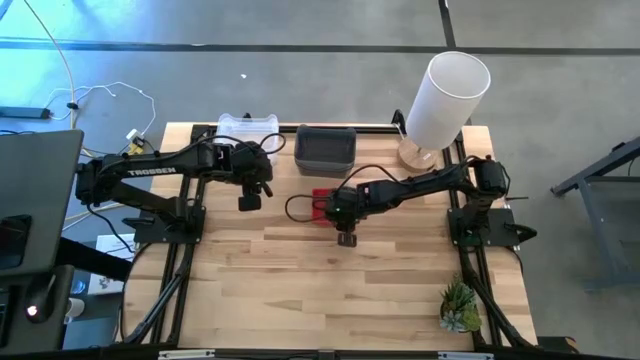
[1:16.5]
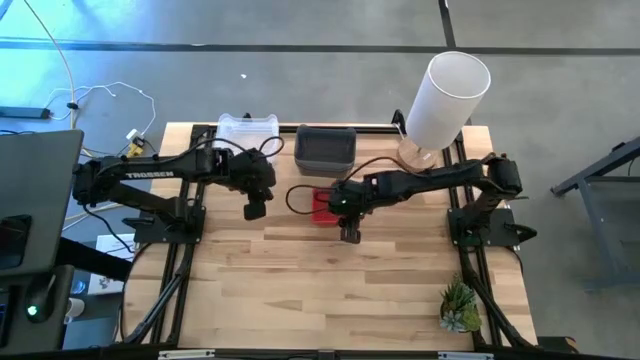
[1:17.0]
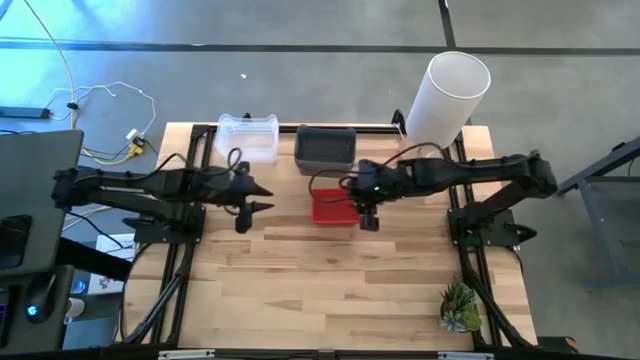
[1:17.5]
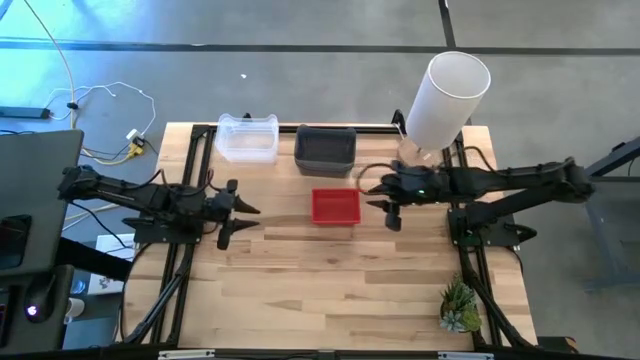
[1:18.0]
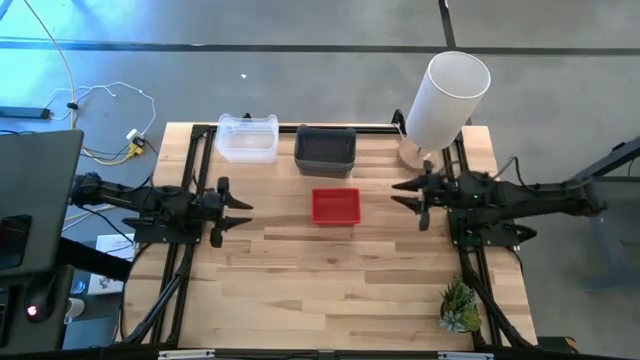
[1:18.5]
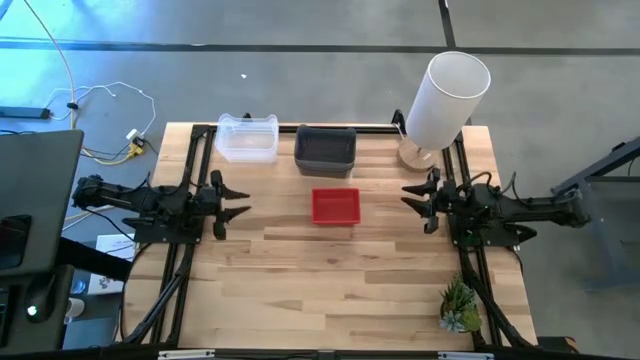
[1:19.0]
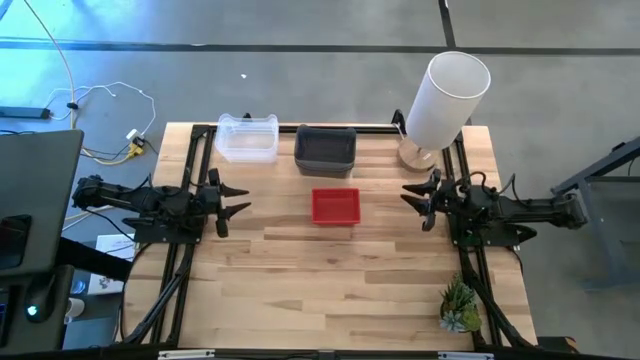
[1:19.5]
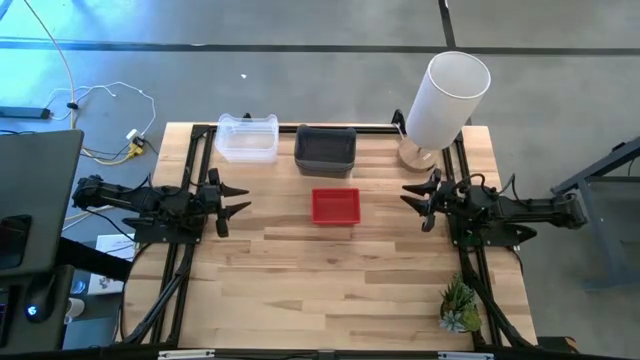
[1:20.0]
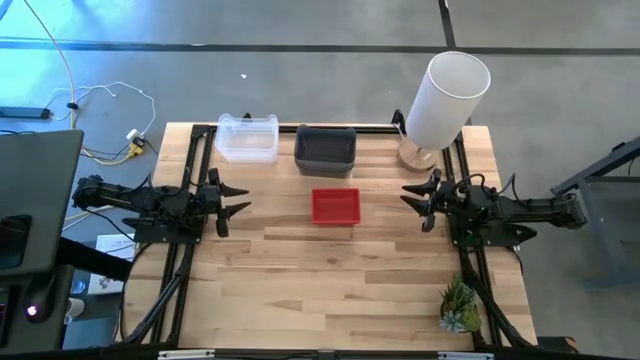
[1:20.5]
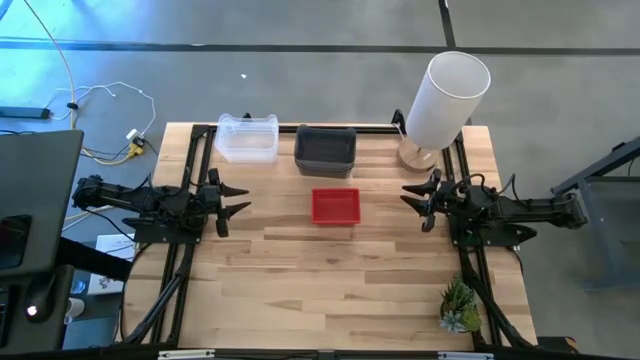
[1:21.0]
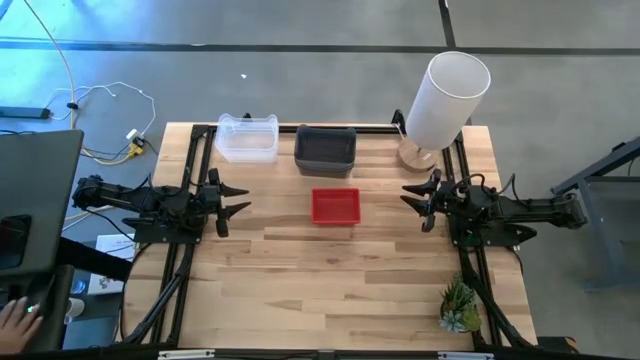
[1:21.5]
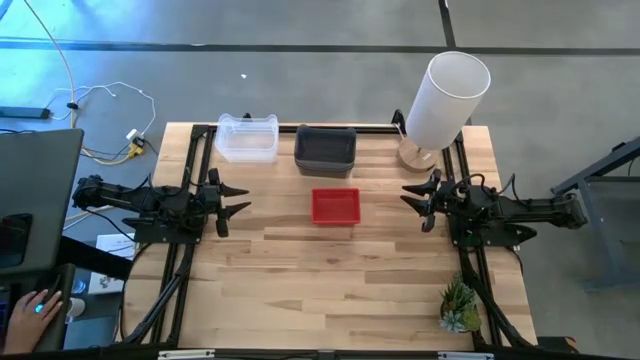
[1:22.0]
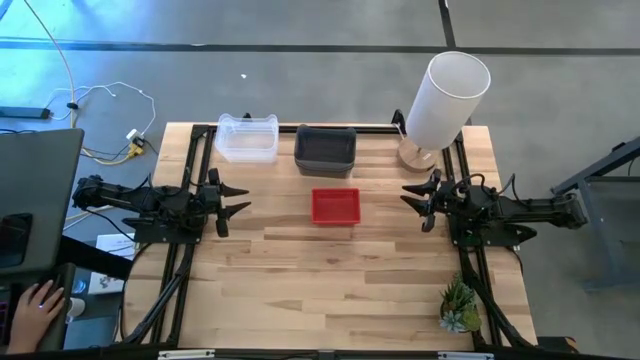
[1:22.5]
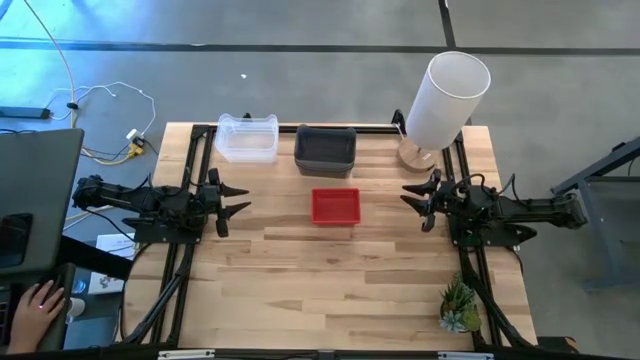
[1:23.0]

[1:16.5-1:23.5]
Return to Home Position
